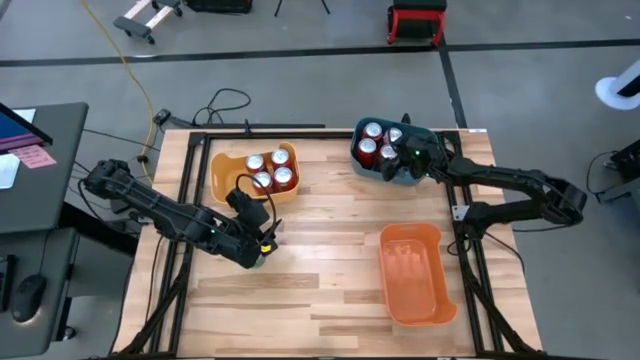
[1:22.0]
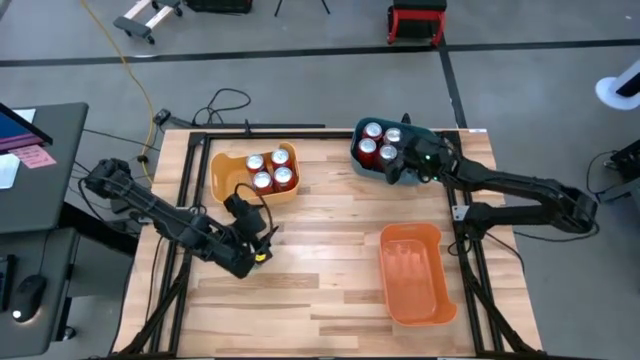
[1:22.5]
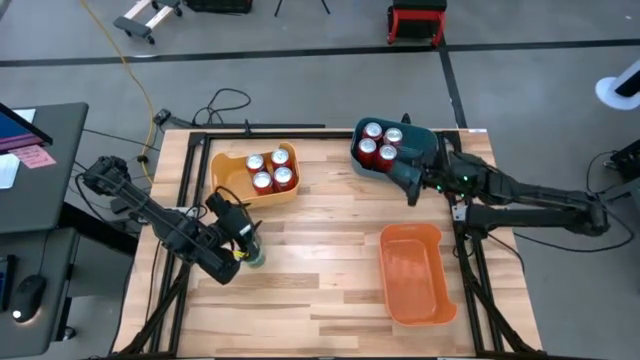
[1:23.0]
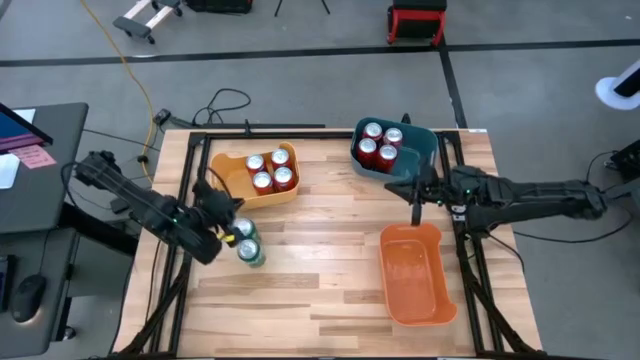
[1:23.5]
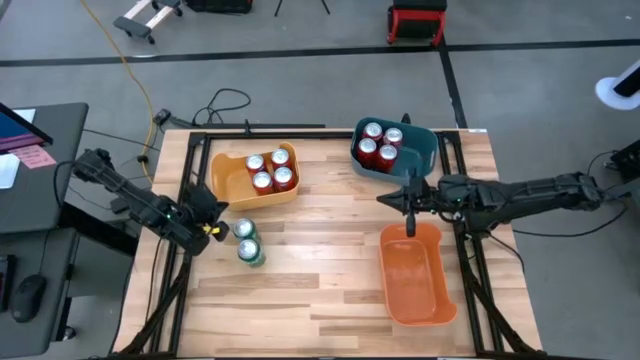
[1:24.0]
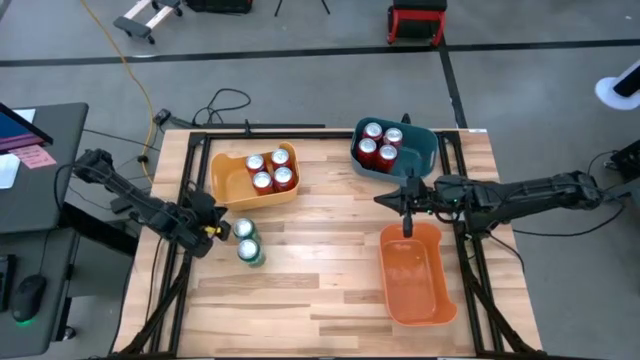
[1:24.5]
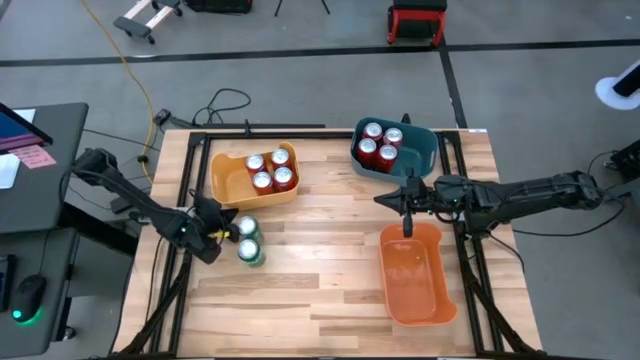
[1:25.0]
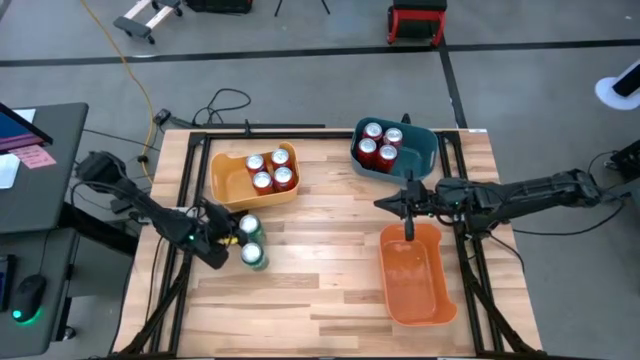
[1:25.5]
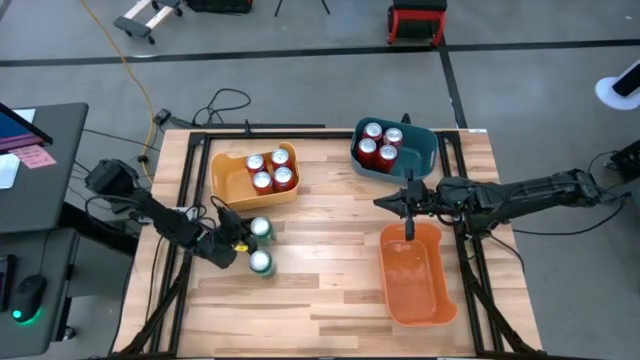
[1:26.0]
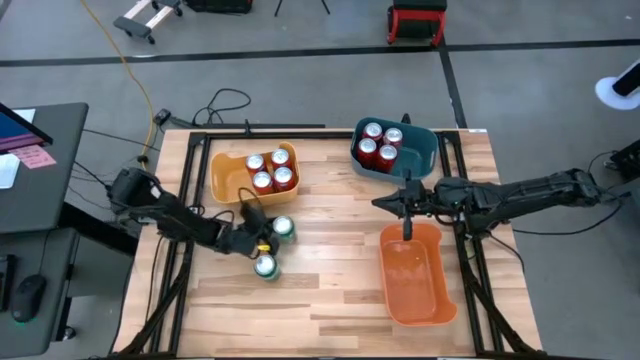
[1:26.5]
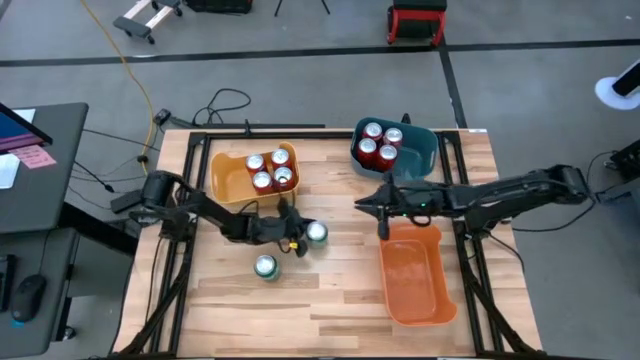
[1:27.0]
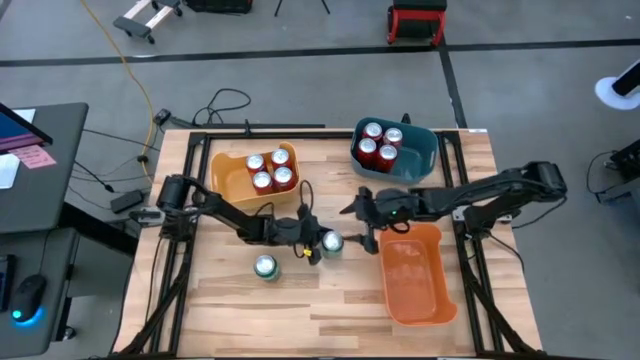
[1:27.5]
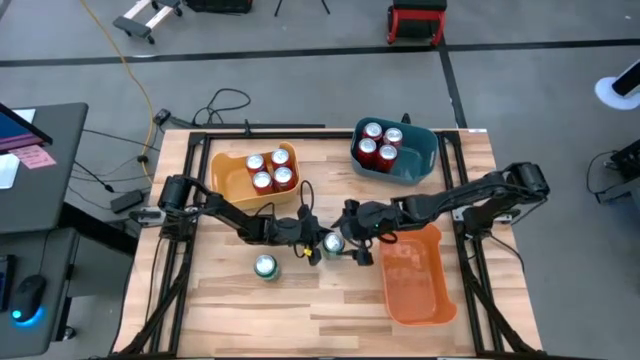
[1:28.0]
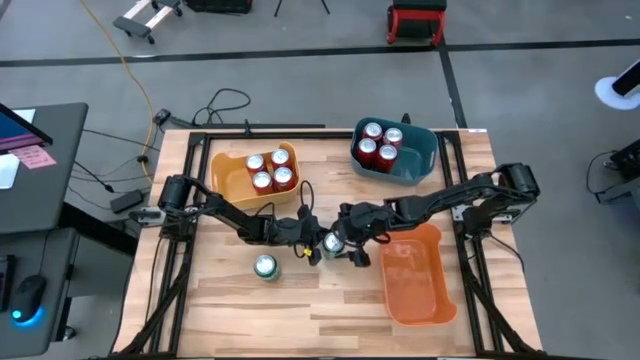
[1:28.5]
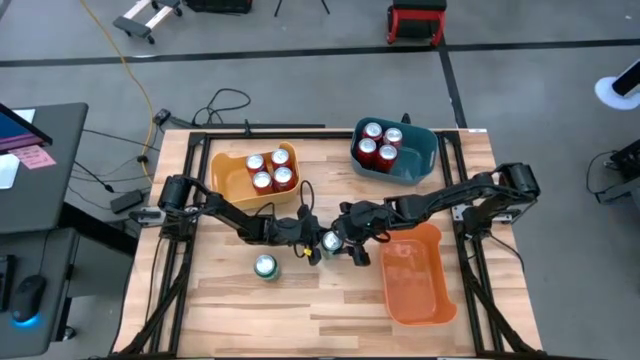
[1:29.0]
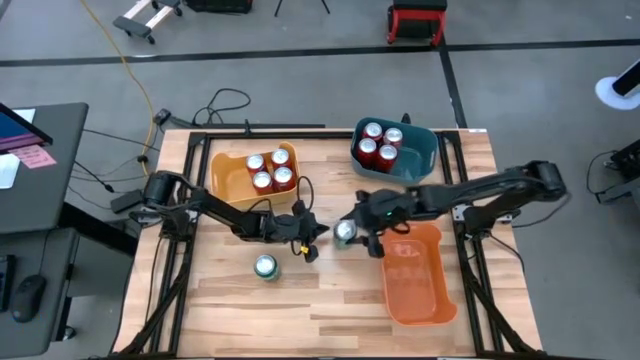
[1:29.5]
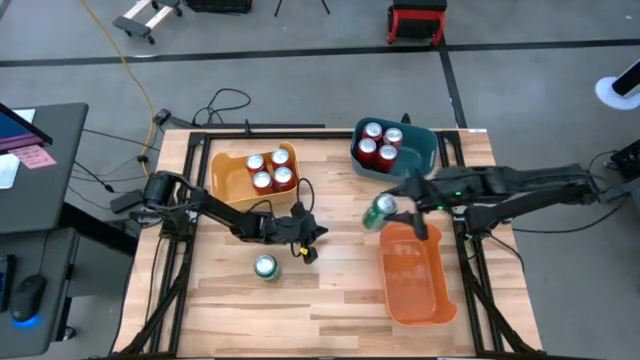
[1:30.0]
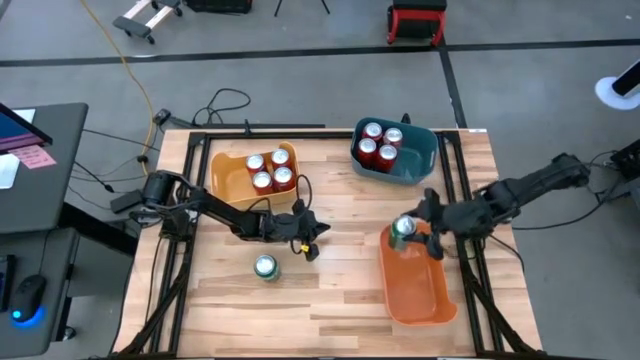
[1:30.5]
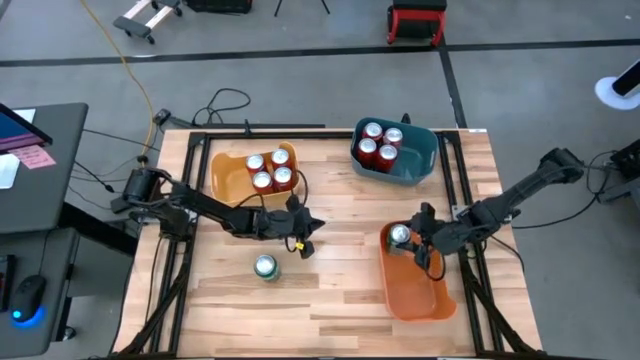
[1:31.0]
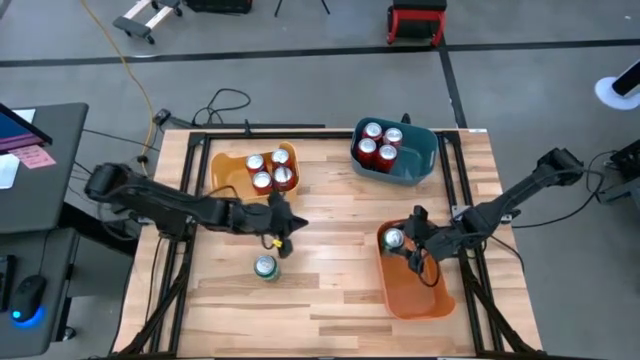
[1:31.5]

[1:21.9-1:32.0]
Task: Sort soda cans
Put the top green soda can into the orange bin

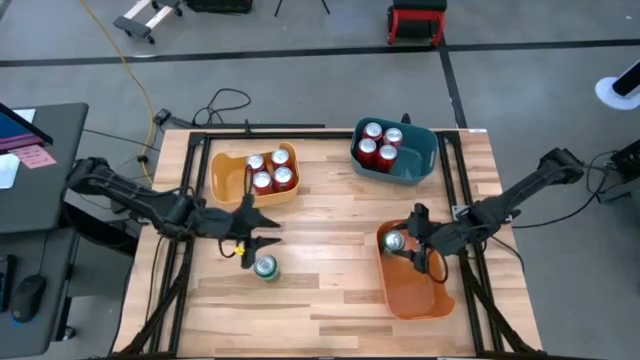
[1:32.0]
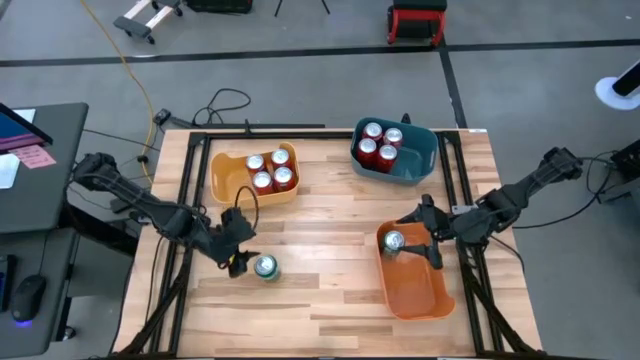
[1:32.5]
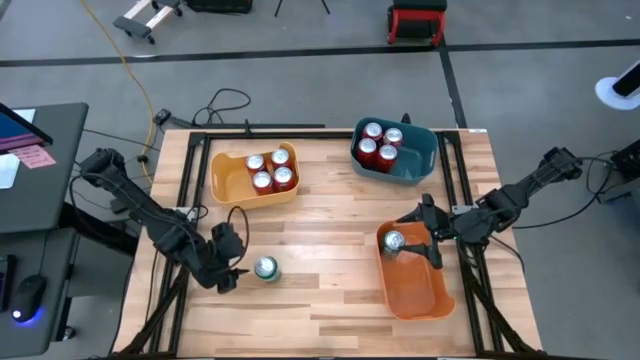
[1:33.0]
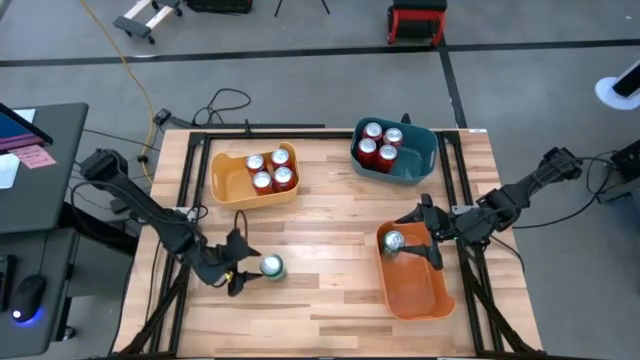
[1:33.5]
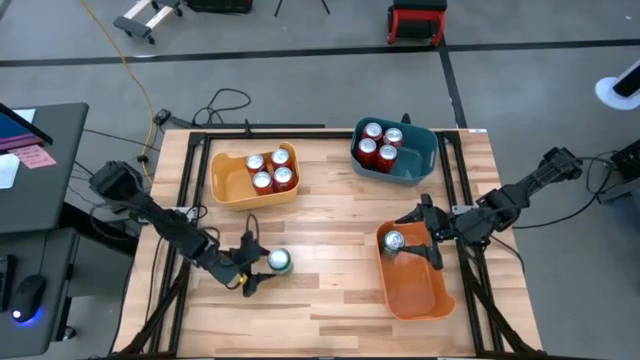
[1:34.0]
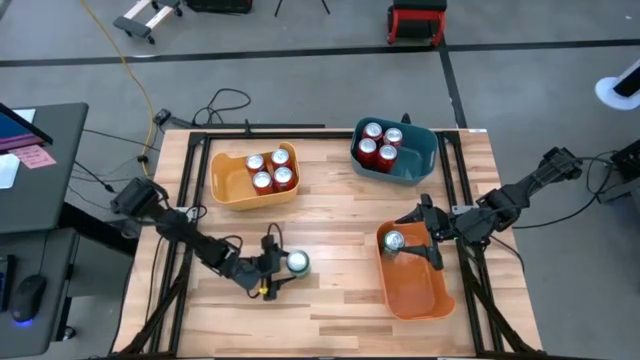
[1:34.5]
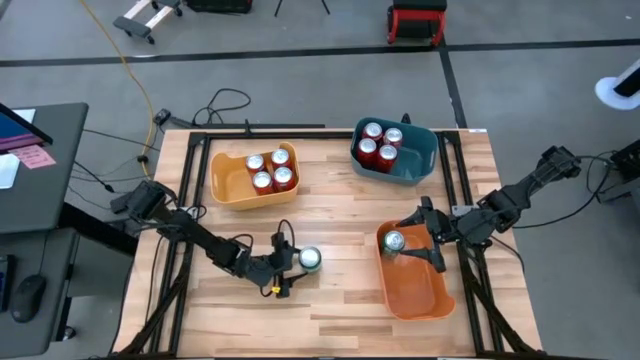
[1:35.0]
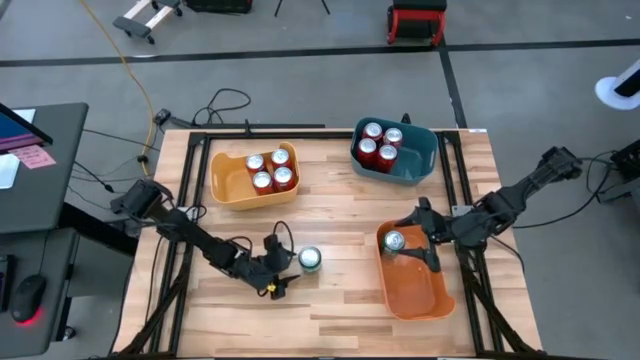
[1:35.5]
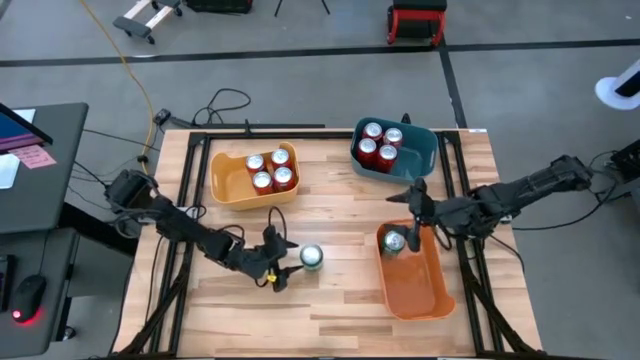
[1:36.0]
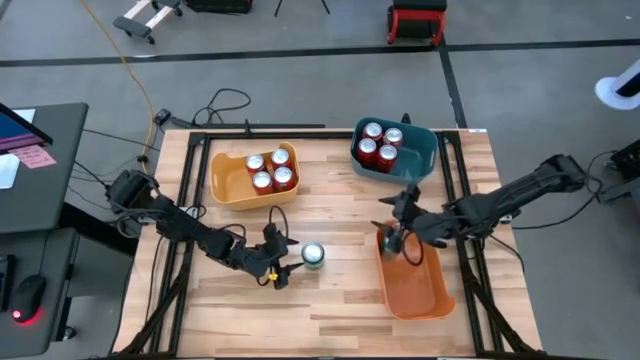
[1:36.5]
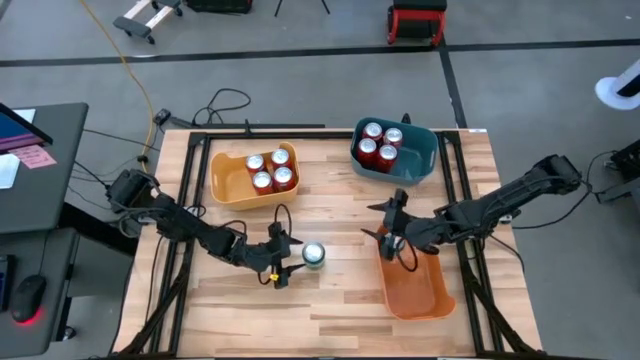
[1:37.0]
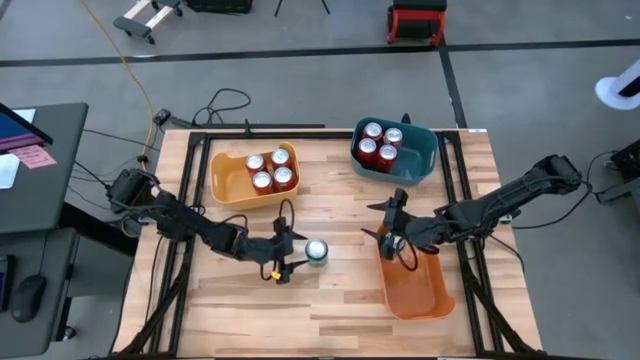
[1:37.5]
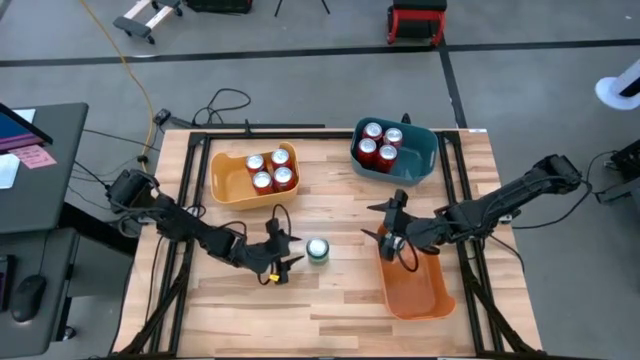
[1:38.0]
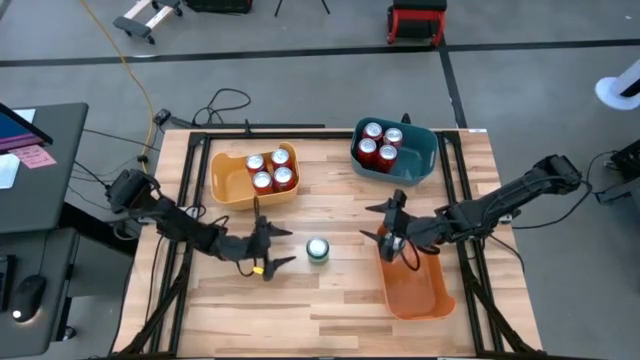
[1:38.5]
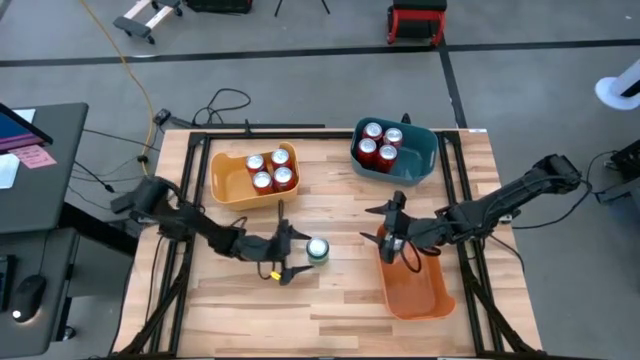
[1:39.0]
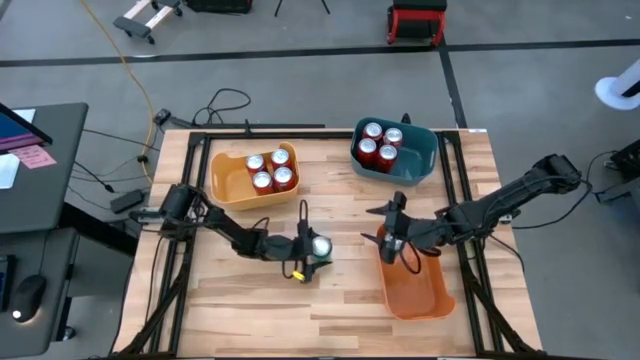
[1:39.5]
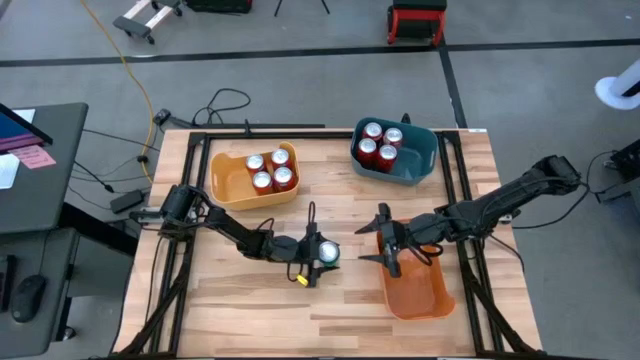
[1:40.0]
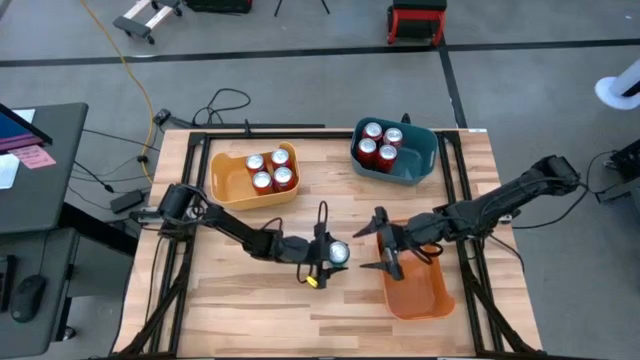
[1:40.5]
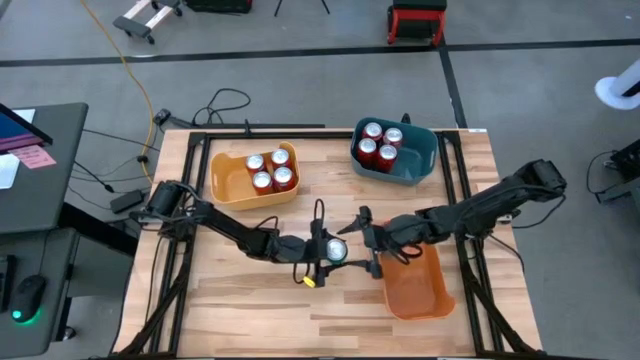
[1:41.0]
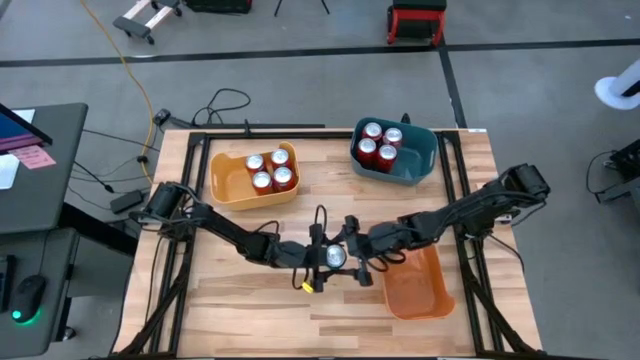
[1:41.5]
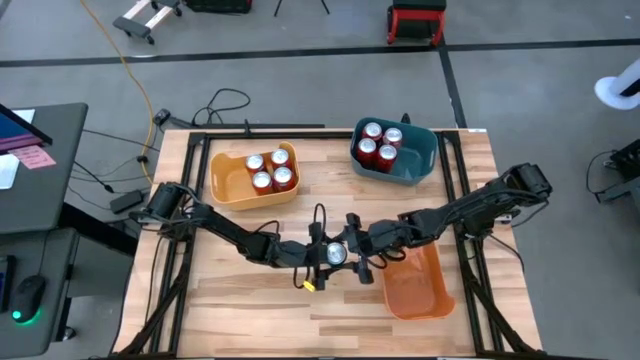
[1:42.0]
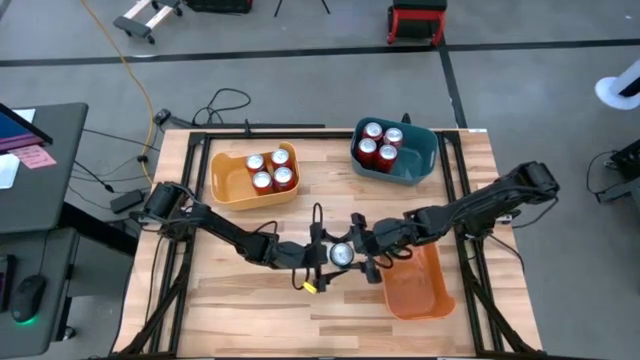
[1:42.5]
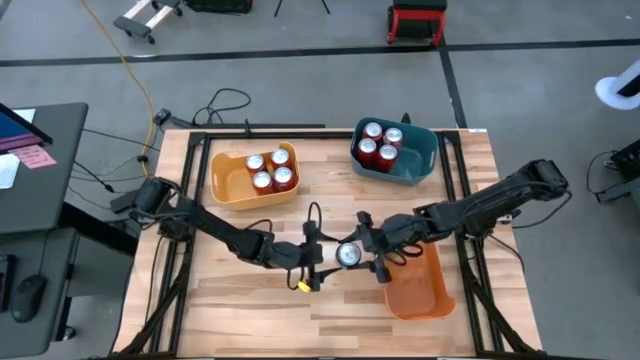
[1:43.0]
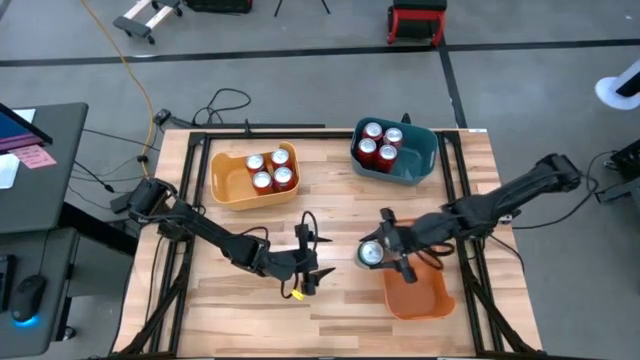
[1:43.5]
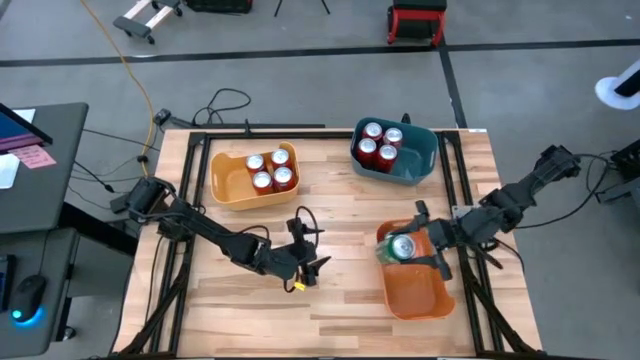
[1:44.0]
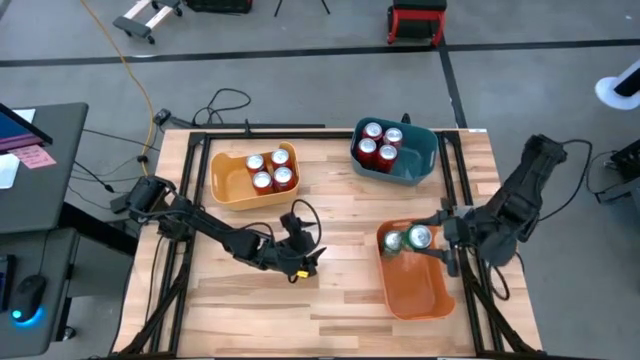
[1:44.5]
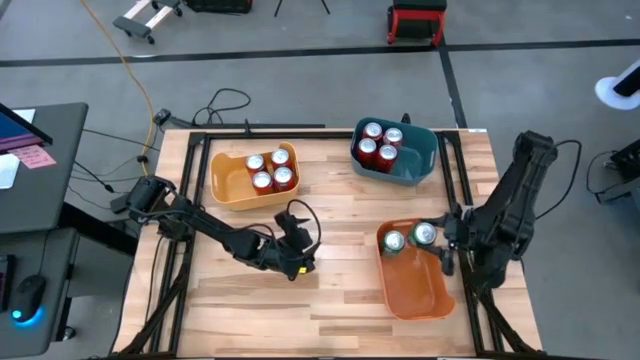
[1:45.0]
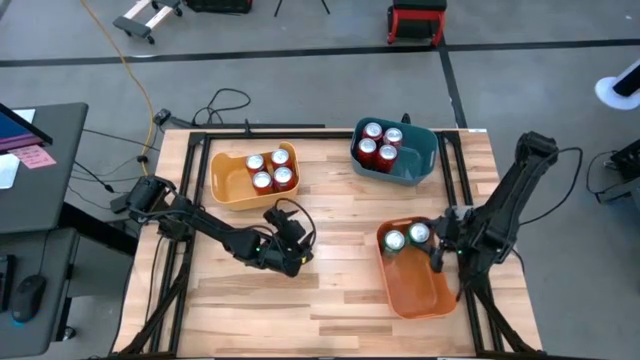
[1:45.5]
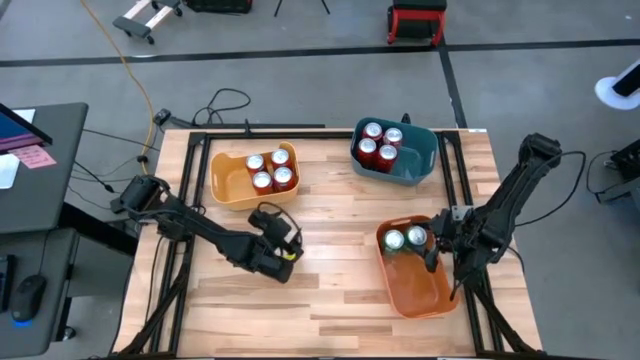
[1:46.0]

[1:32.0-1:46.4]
Put the green soda can into the orange bin
